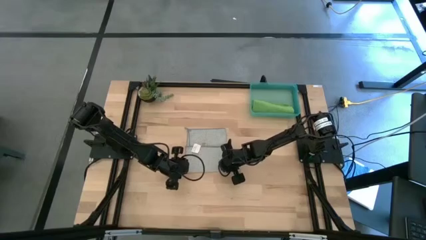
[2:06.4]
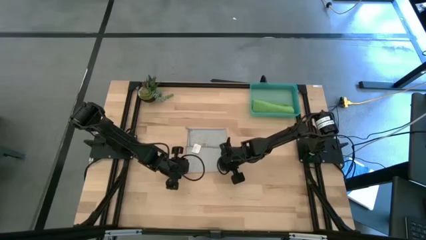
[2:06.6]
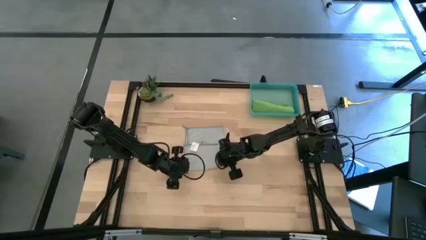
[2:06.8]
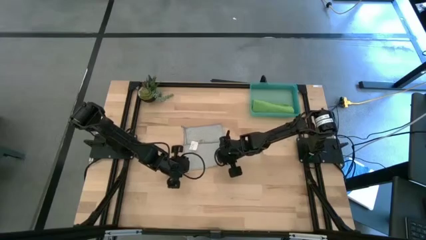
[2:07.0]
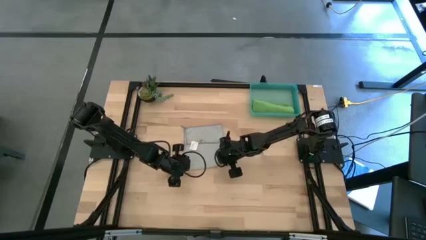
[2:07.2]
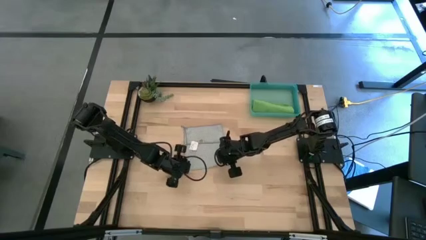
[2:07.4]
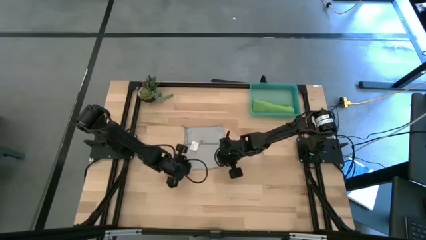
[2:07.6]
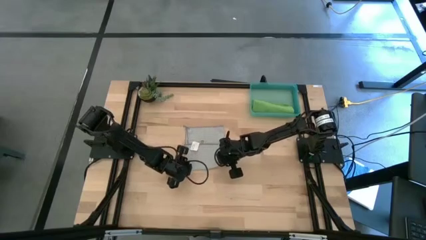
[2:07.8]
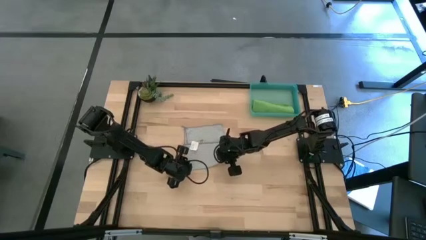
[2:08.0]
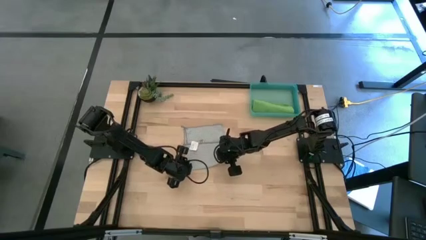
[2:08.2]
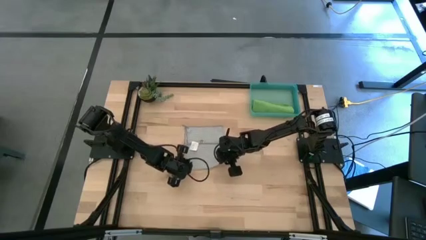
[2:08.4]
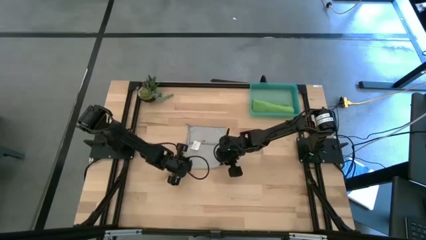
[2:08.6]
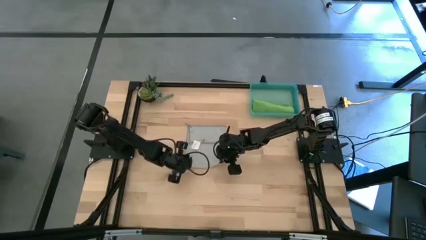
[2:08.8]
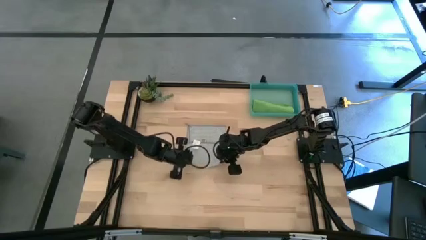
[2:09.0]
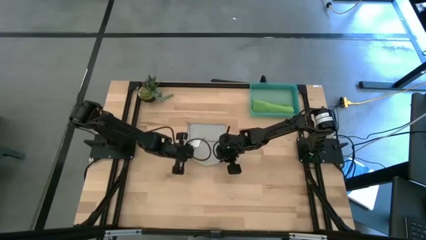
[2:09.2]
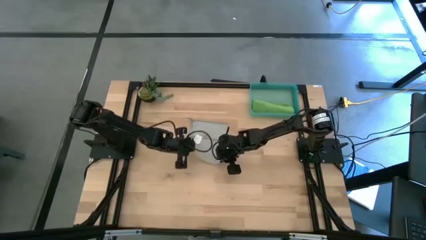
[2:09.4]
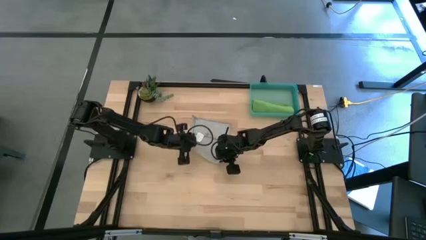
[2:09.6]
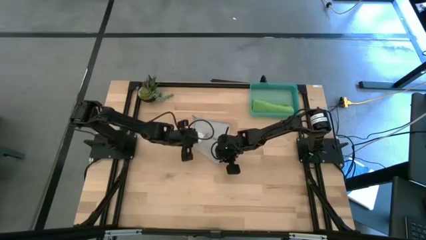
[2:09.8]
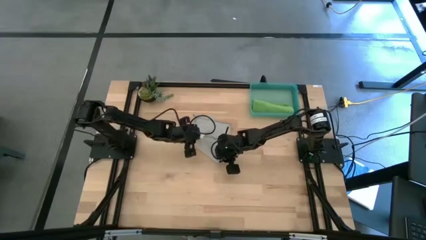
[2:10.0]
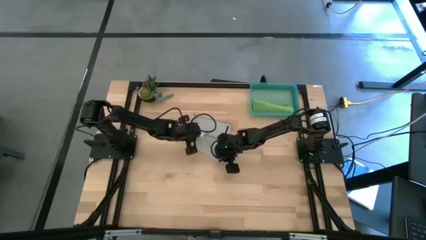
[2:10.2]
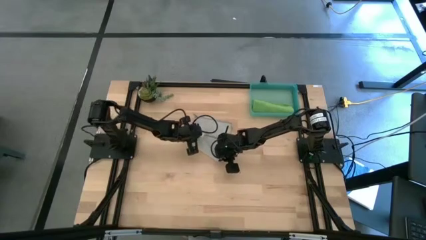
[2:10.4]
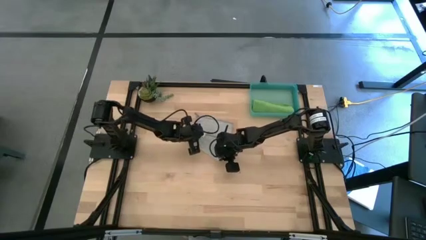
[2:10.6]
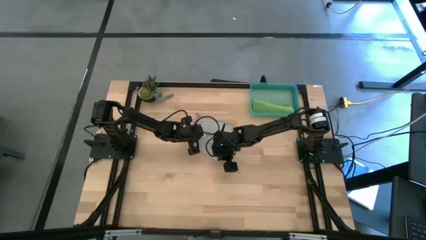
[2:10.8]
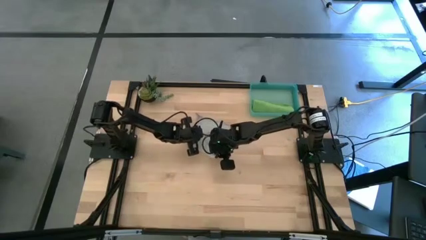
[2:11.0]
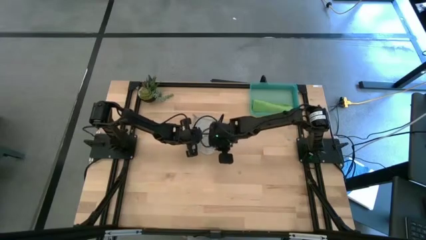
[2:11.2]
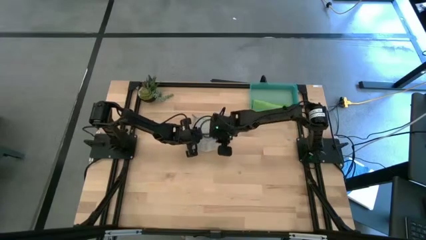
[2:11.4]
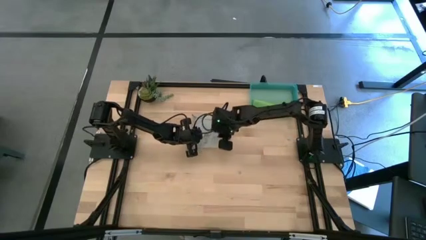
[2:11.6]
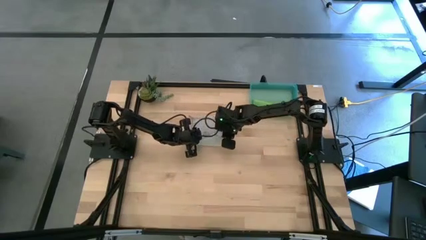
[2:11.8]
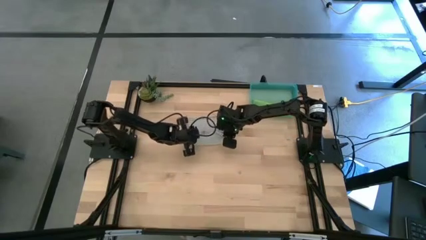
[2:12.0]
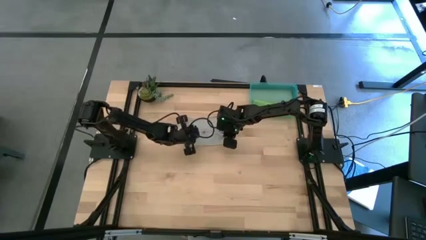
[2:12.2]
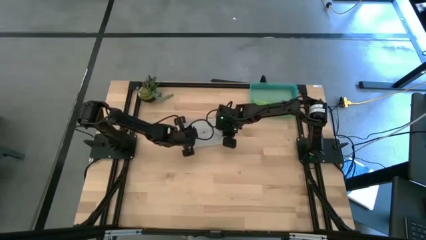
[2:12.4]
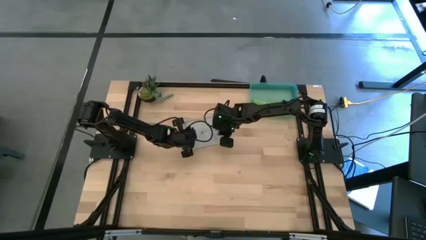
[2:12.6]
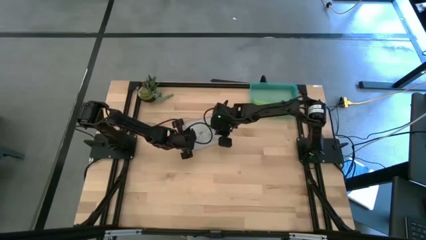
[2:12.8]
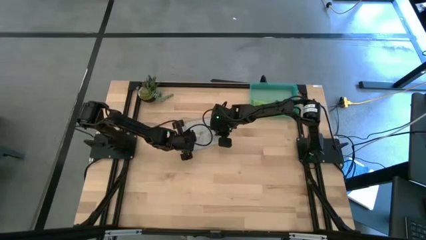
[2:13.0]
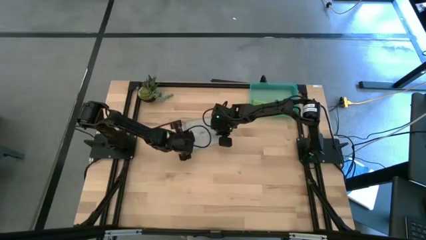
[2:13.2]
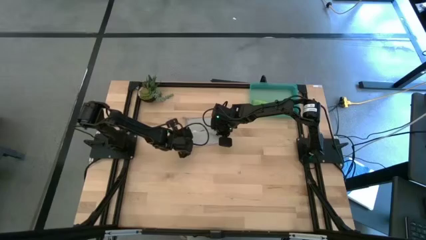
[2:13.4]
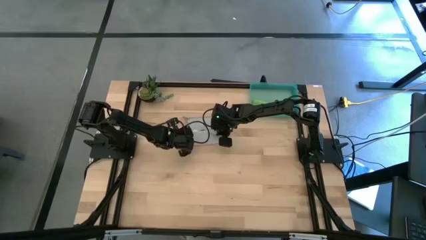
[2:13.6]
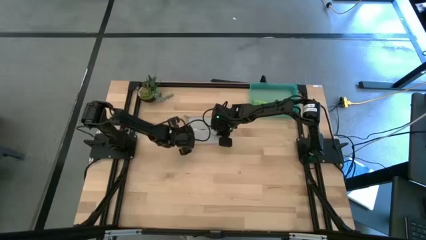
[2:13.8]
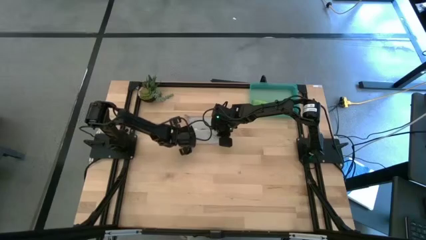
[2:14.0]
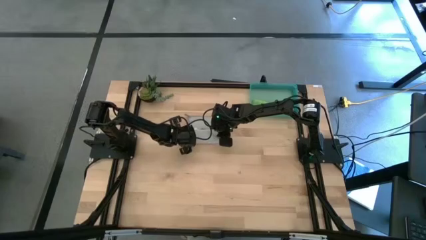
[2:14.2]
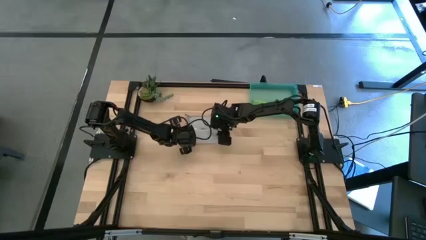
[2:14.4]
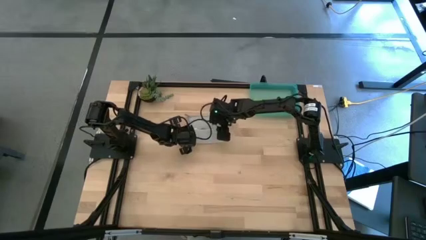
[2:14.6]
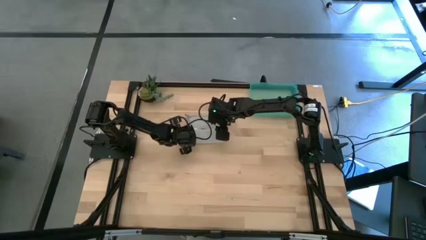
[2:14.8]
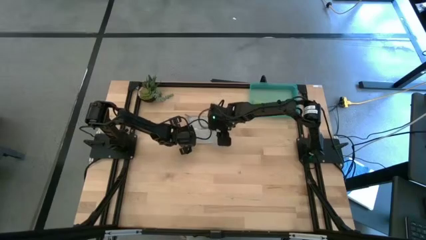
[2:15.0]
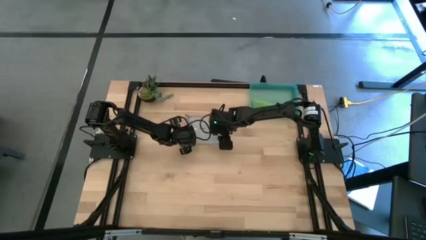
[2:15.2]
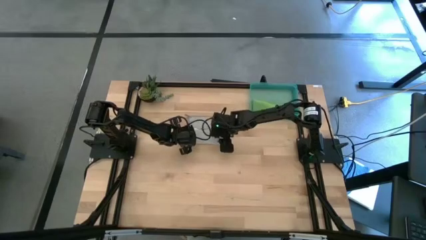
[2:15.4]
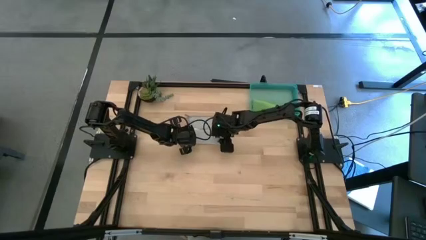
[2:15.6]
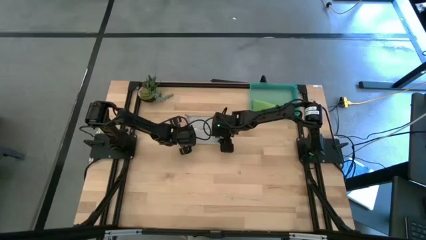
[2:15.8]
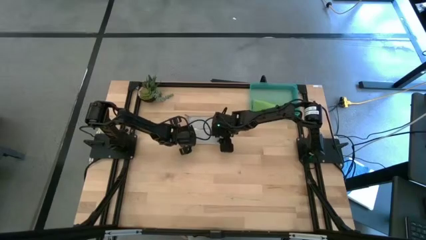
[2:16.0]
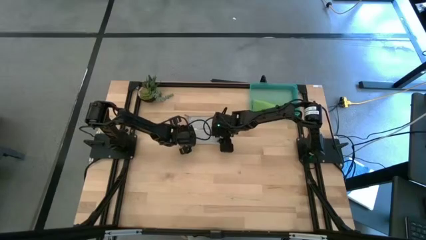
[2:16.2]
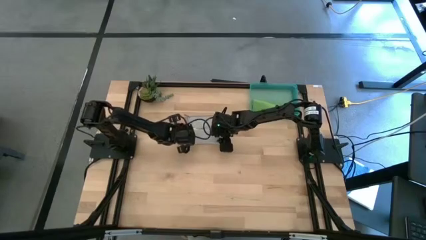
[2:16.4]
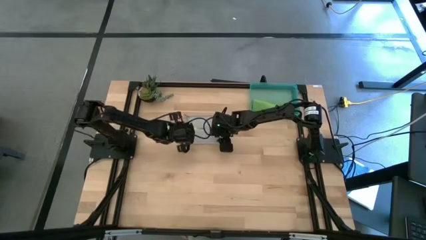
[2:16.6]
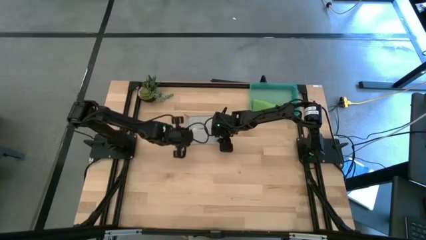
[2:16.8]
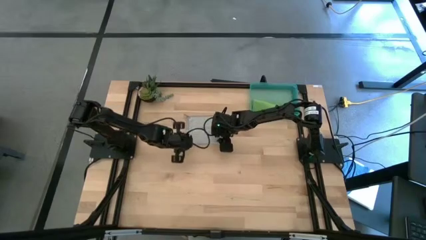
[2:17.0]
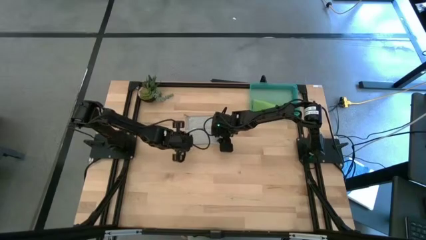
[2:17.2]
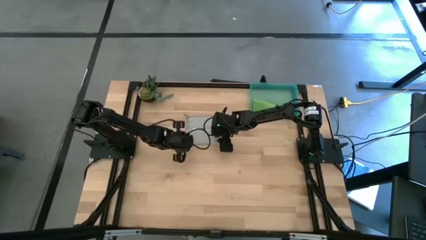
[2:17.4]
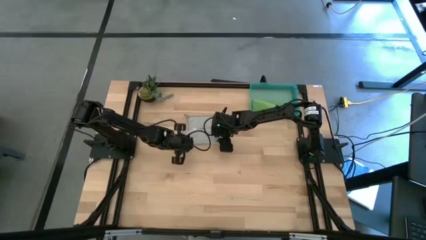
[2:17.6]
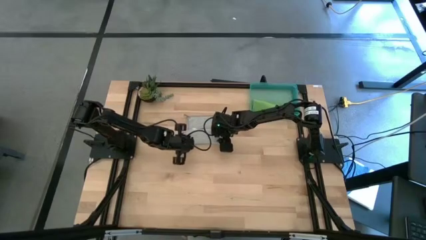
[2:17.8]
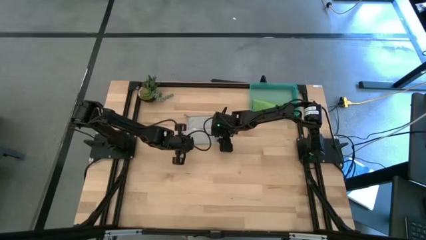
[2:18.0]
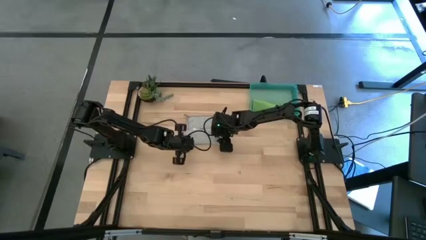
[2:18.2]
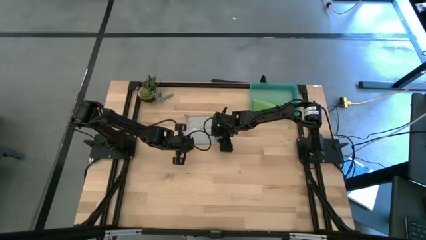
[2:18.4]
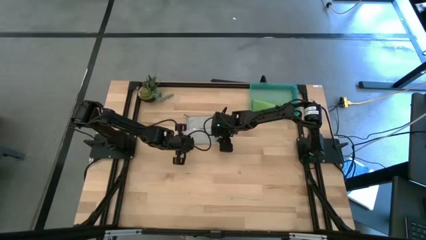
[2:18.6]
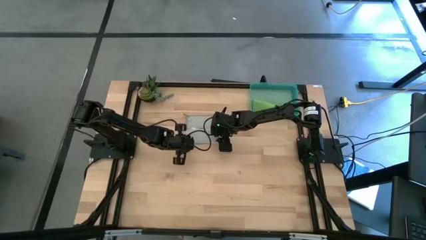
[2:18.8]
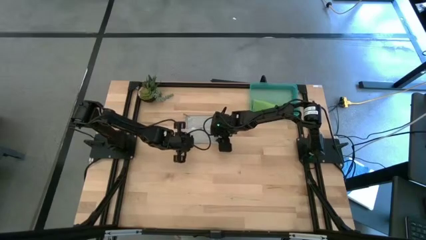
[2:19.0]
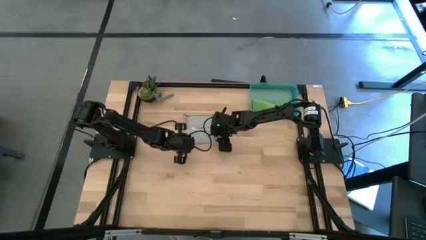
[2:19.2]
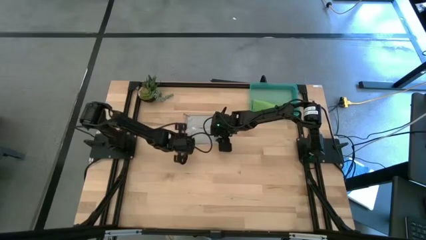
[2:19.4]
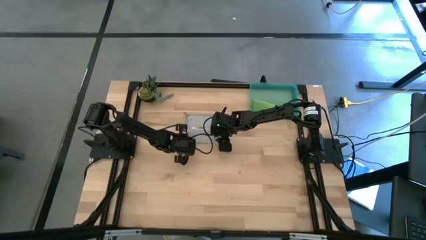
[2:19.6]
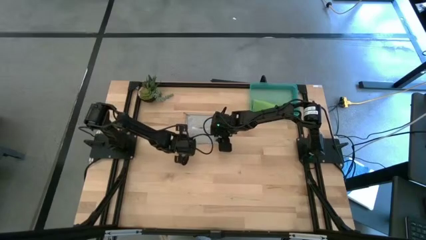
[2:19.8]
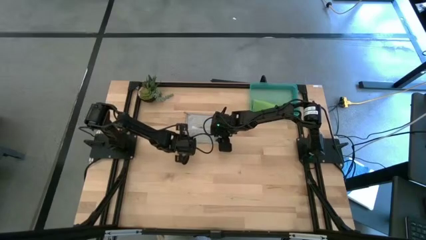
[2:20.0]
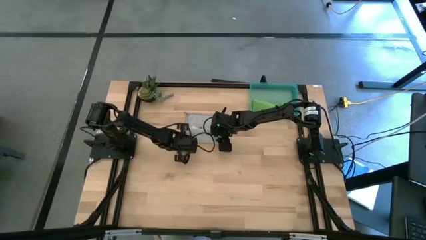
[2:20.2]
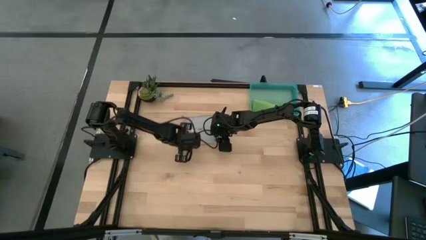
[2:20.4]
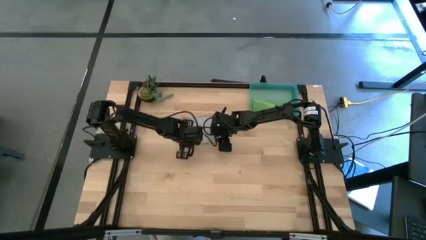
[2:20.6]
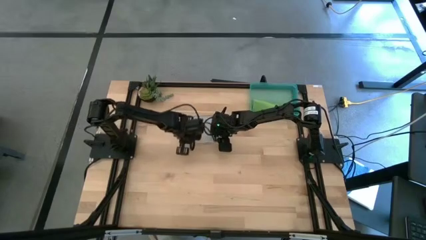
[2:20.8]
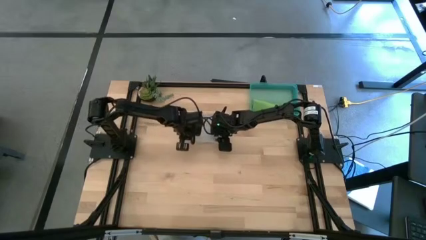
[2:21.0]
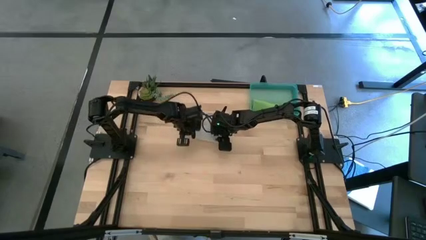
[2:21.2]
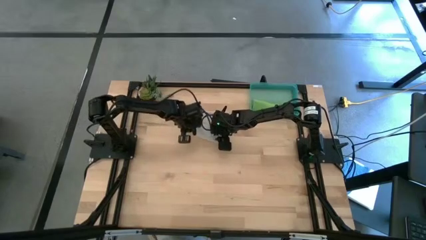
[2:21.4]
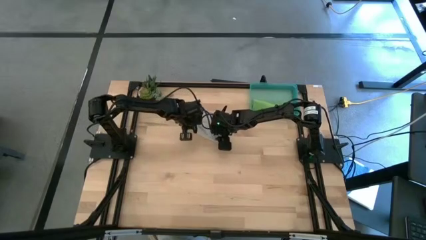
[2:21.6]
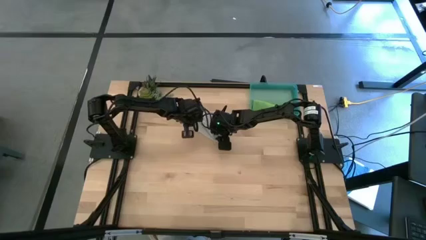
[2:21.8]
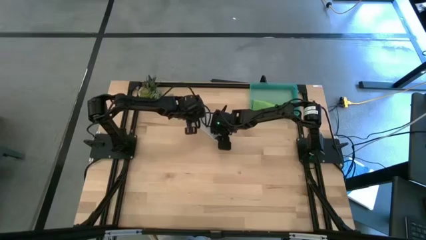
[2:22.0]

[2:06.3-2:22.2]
Task: Roll microfiber towels into tight, uniform cylinder then place into a basket
Roll the gray microfiber cloth
